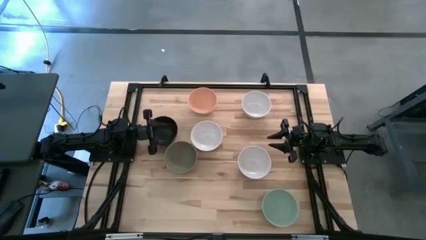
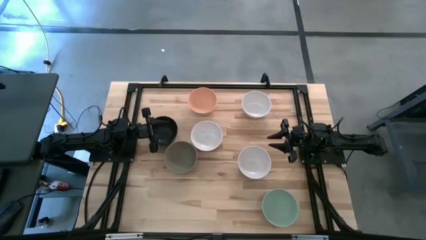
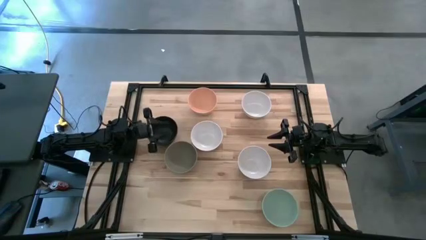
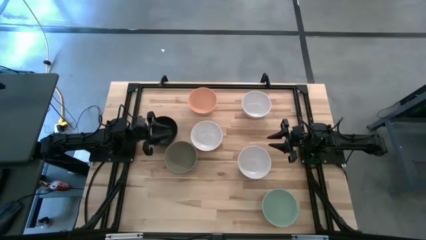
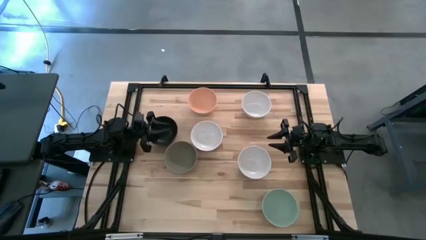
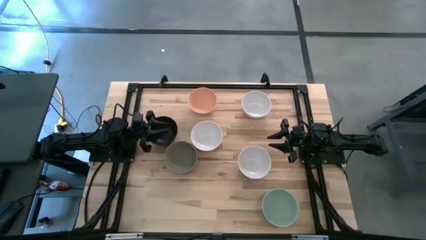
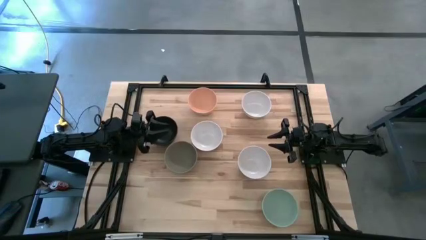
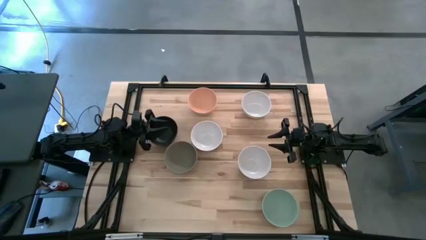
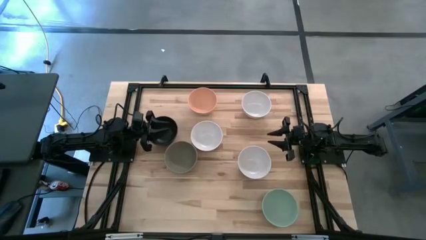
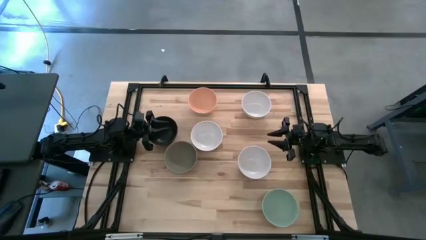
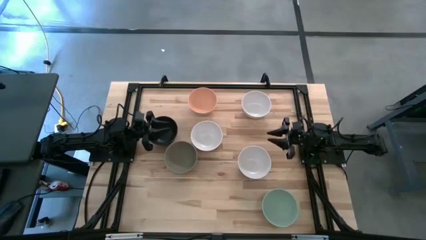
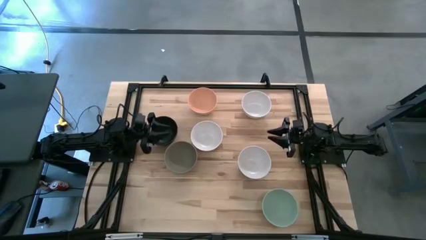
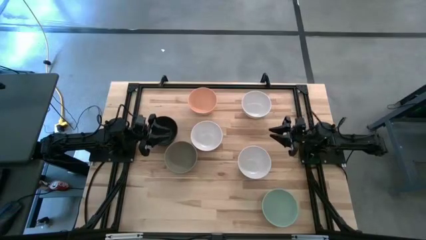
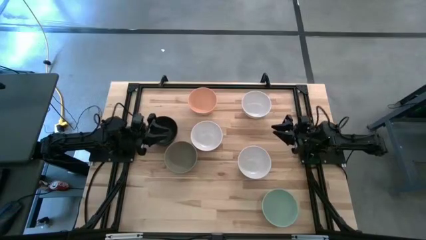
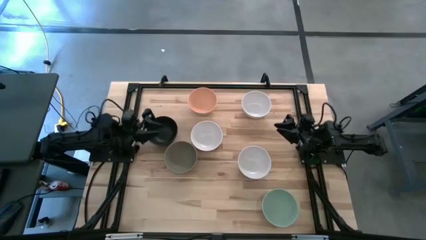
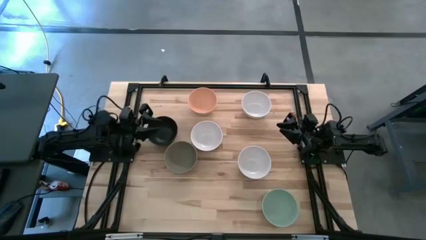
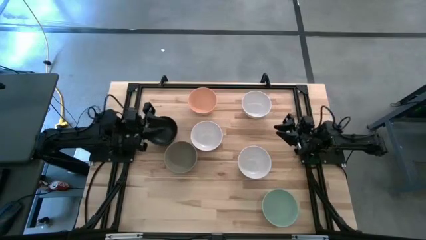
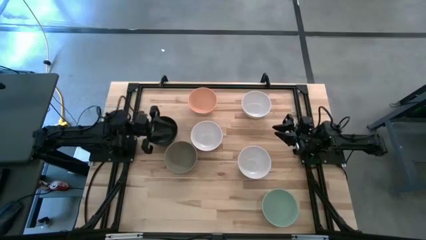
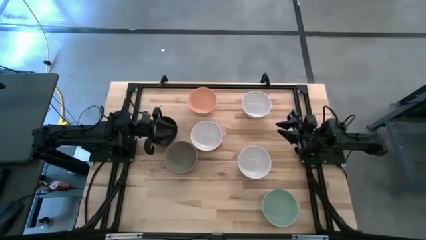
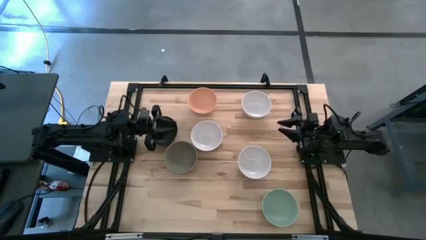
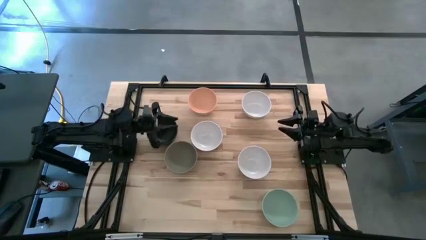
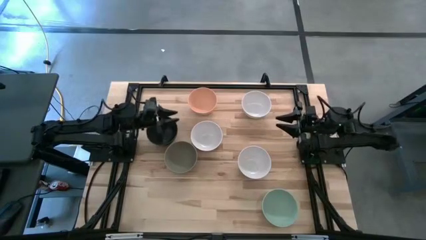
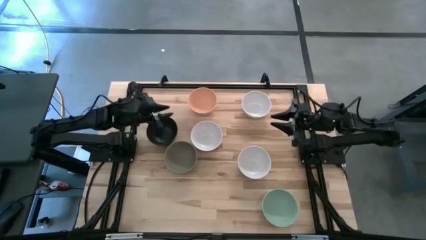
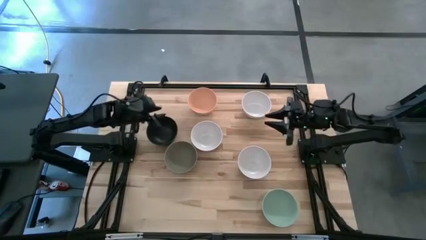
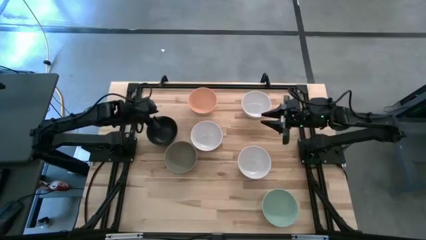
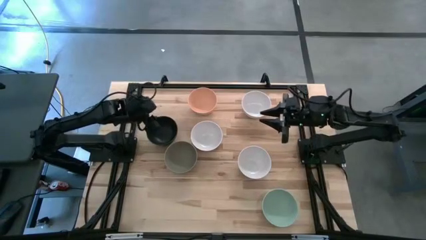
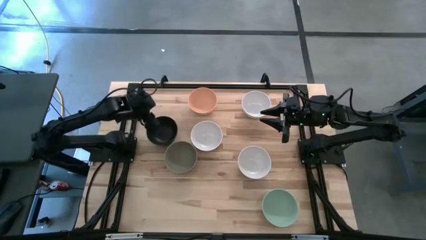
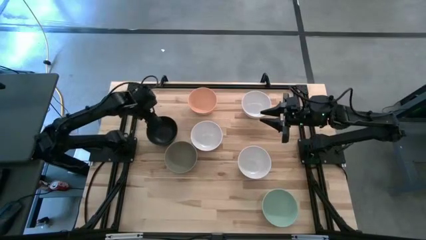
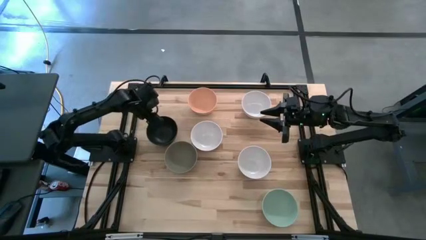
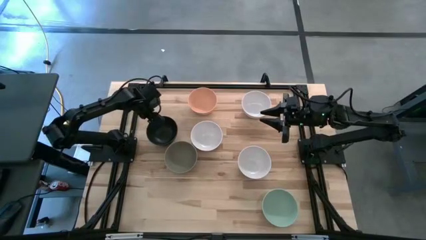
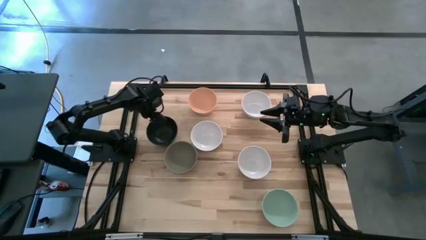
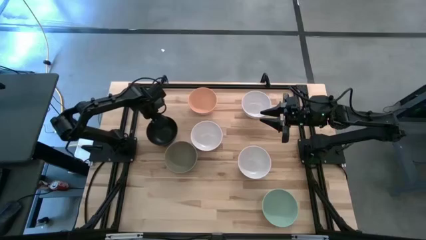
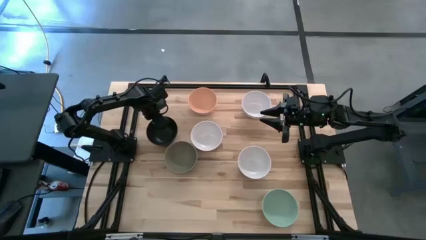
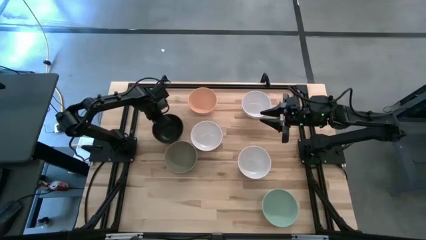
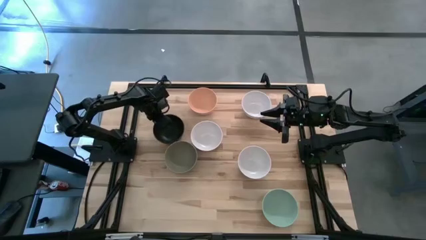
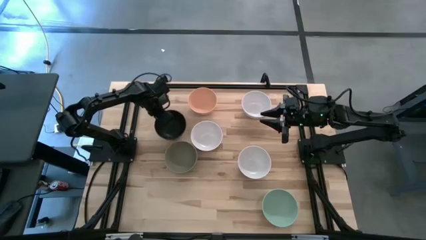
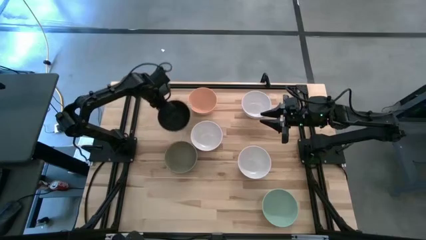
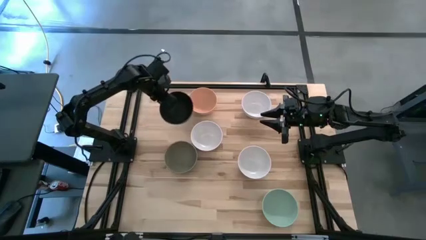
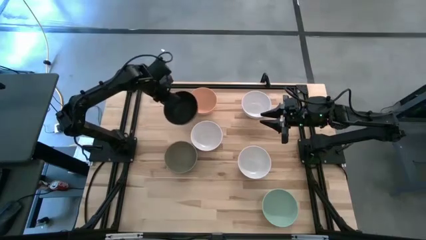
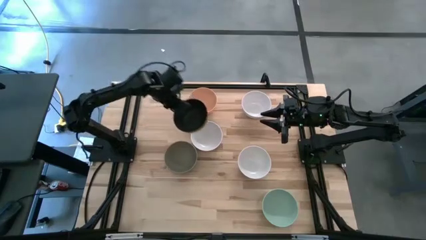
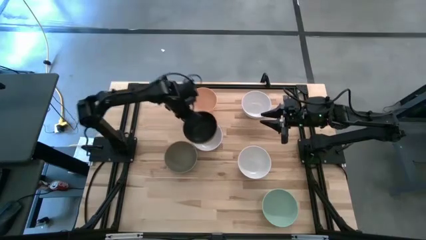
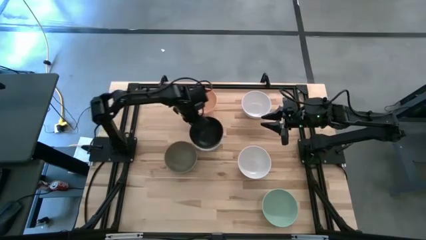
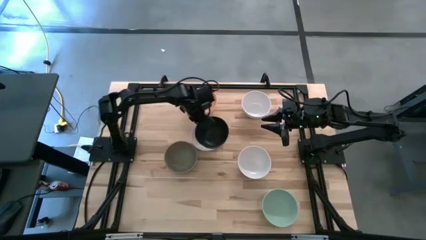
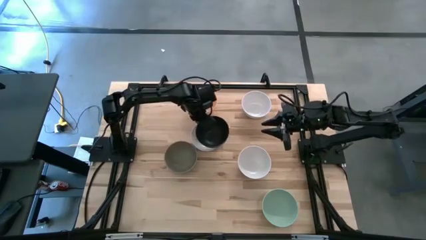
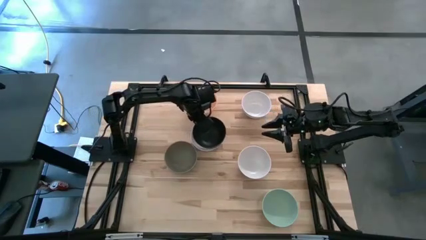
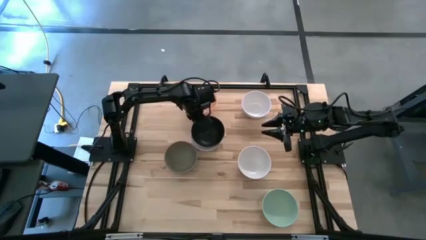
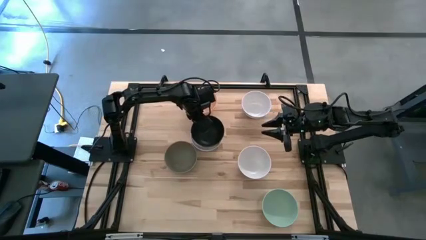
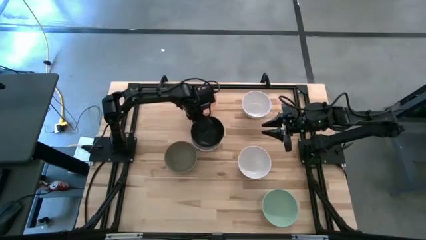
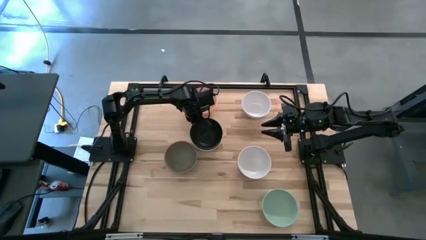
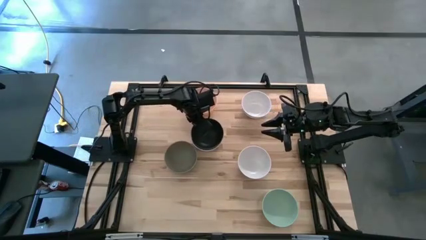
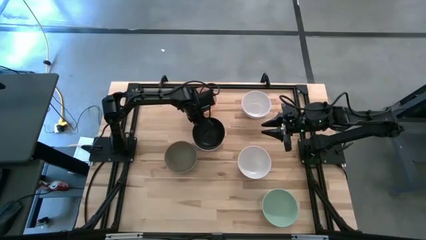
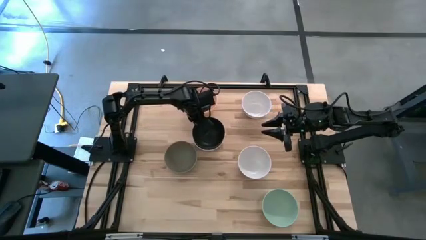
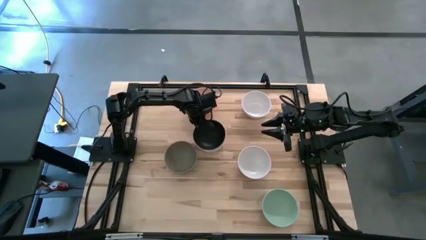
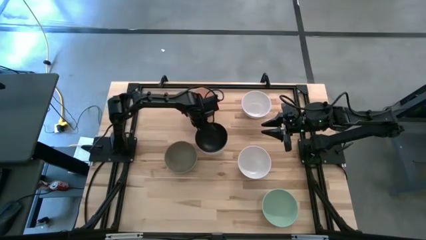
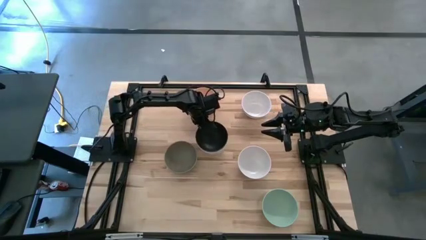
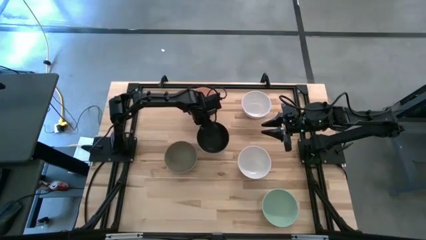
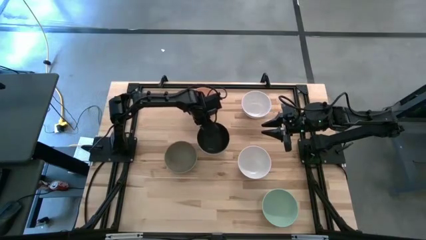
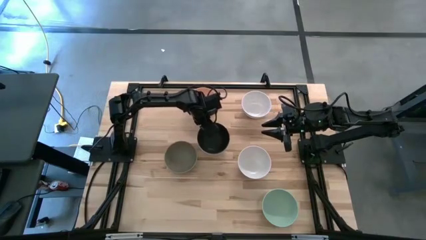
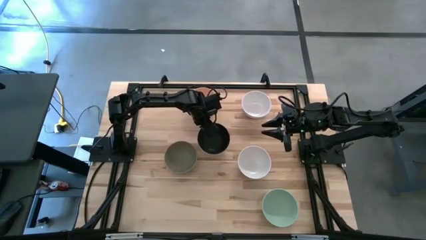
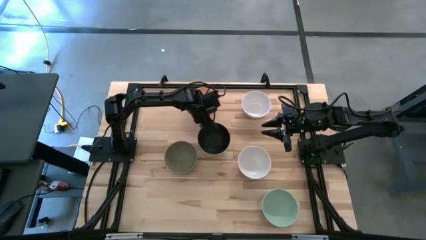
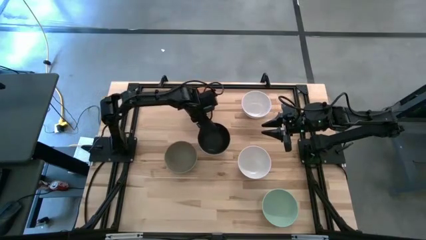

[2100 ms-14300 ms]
Task: Nest bowls inside each other
Stack the black bowl on the middle left white bowl
